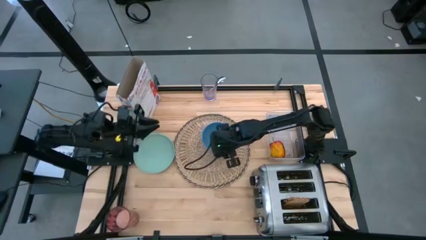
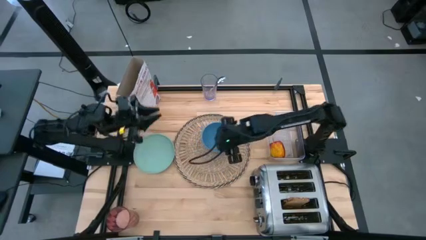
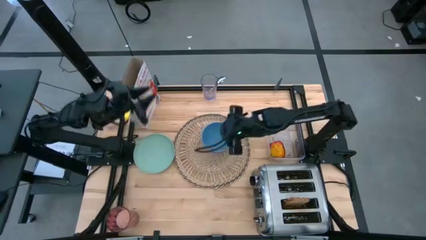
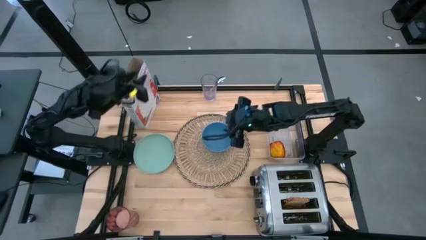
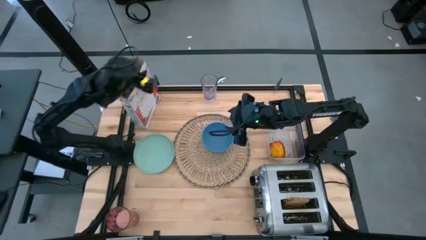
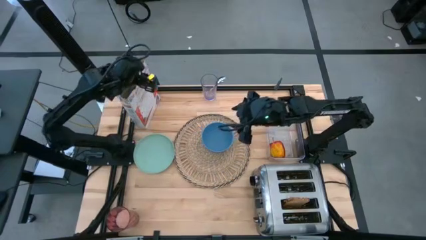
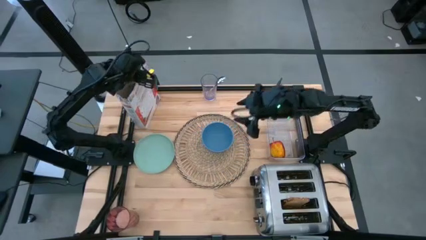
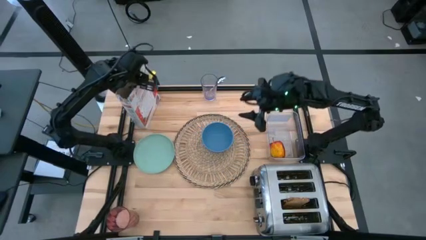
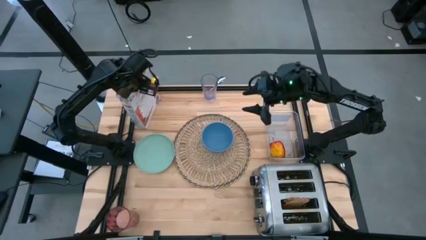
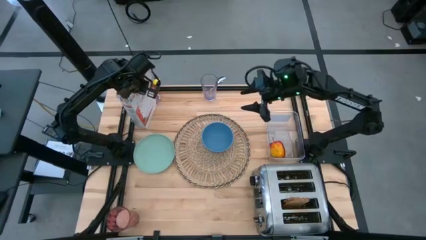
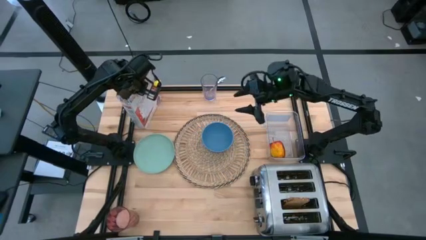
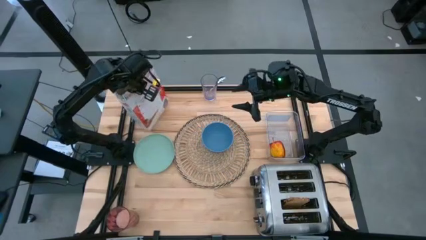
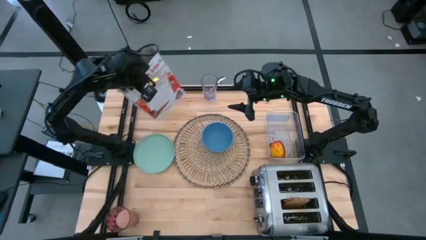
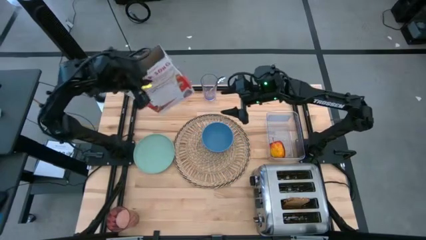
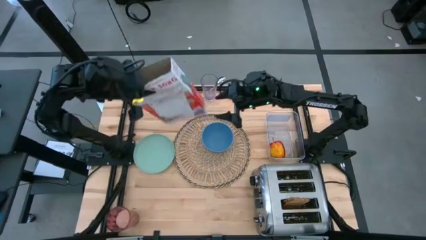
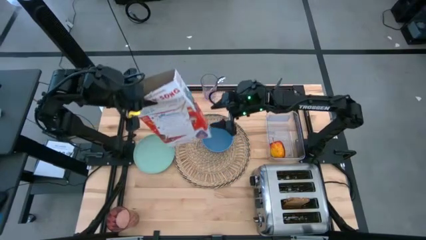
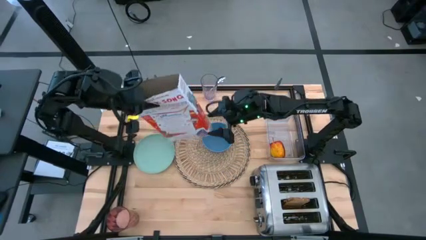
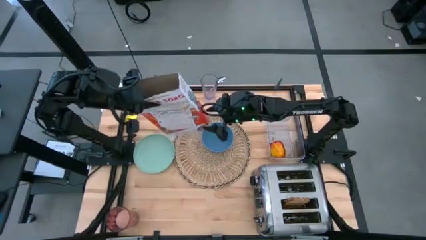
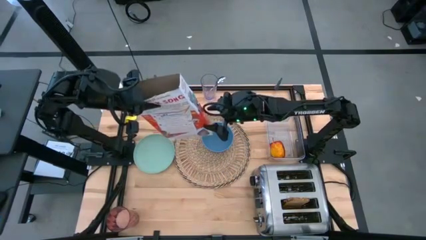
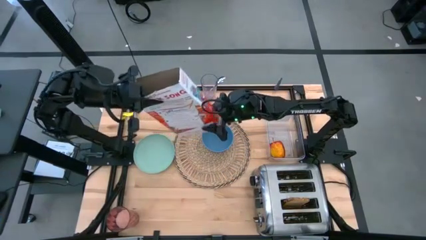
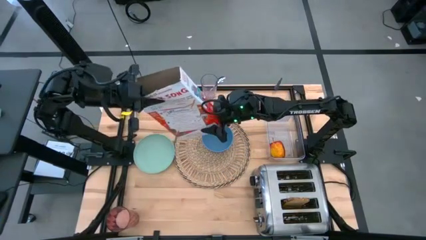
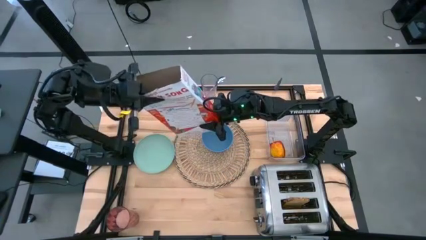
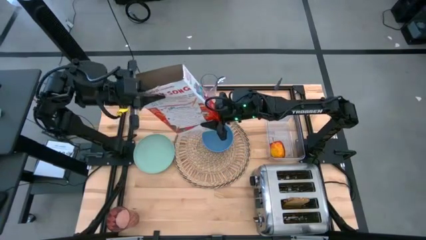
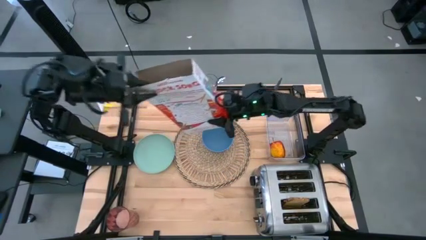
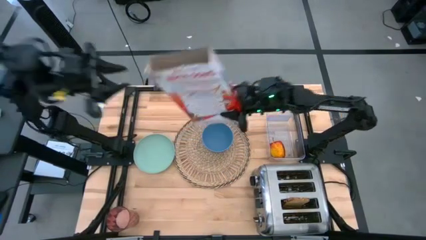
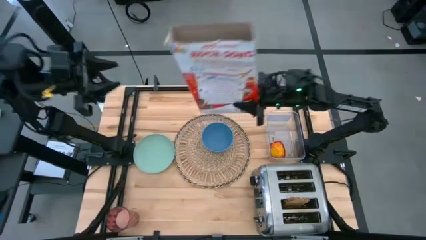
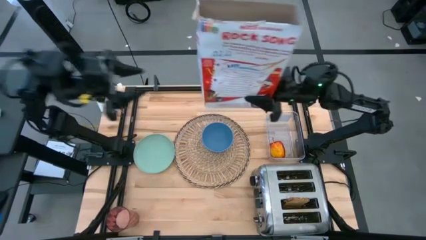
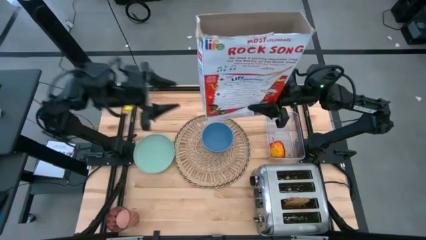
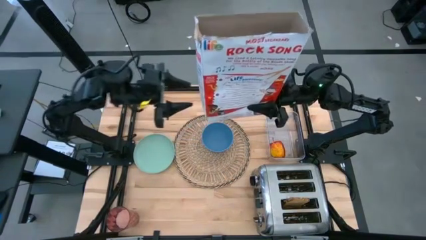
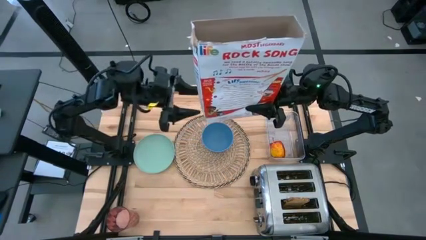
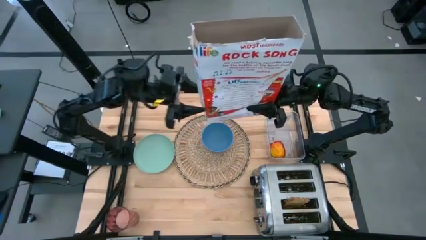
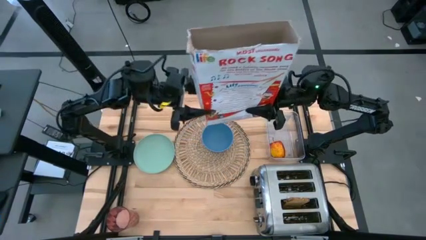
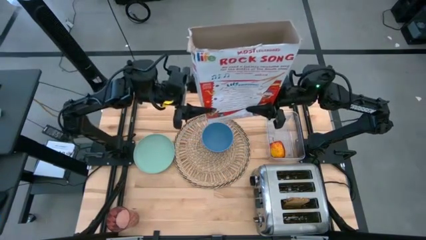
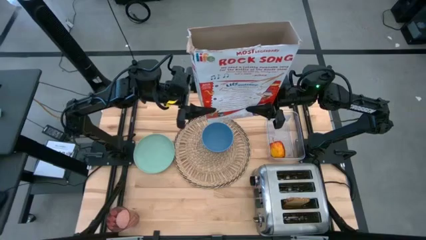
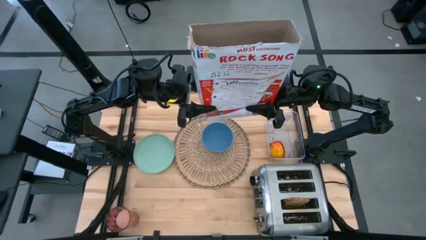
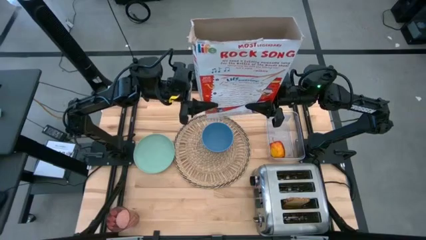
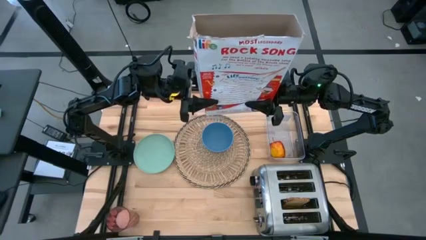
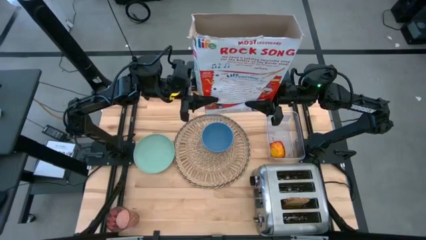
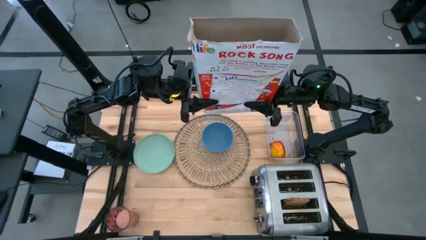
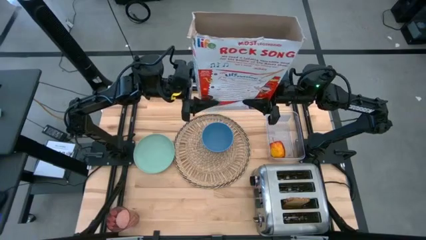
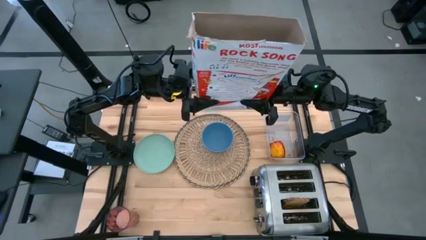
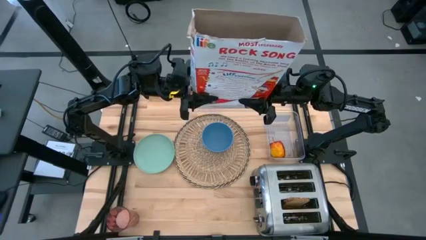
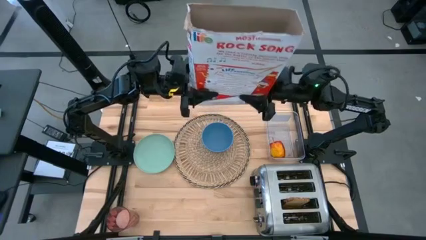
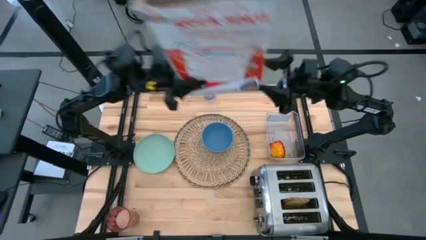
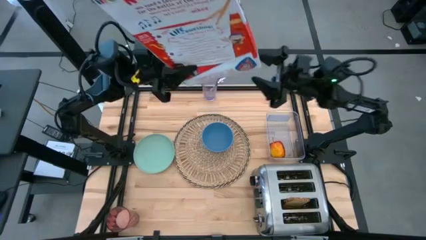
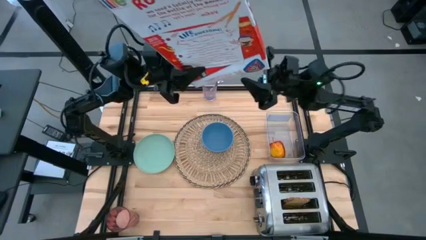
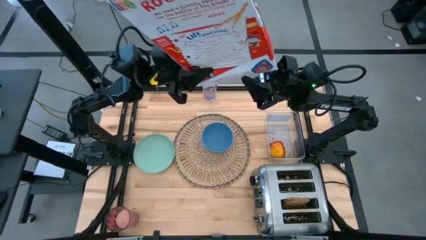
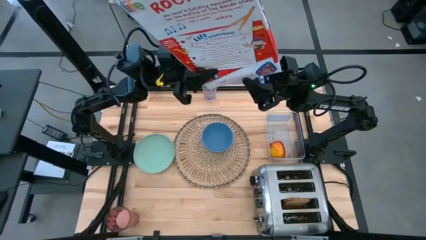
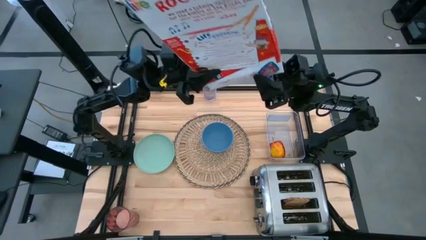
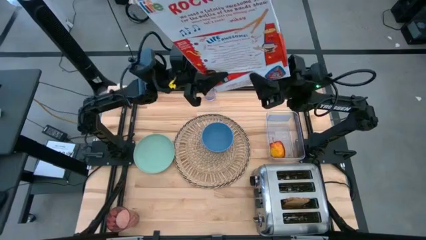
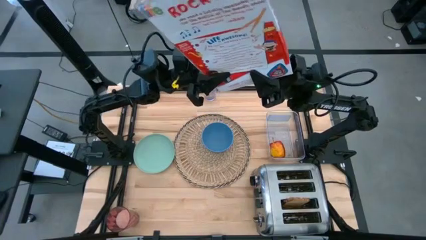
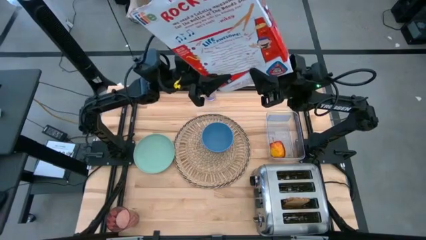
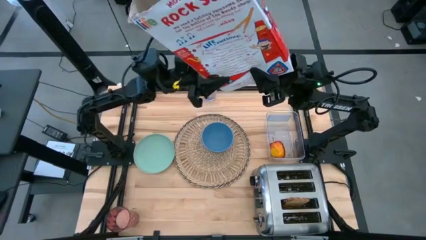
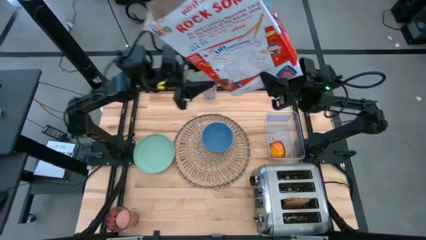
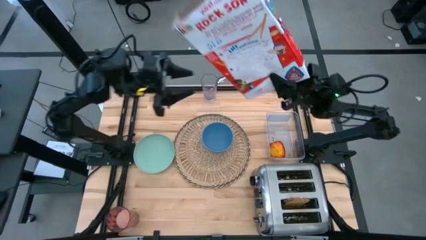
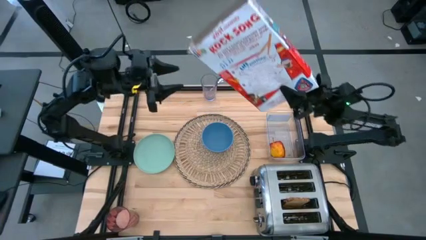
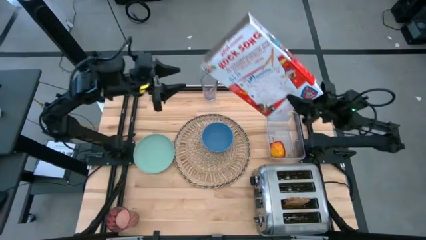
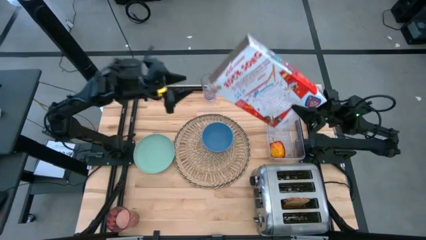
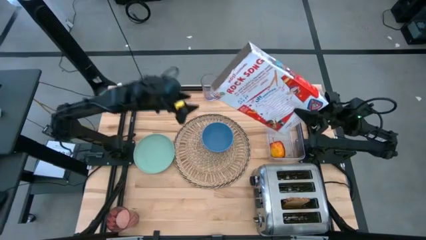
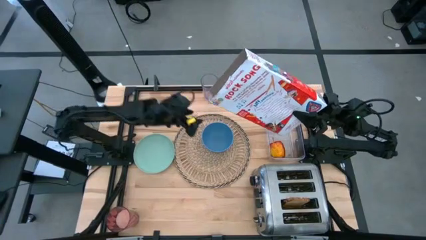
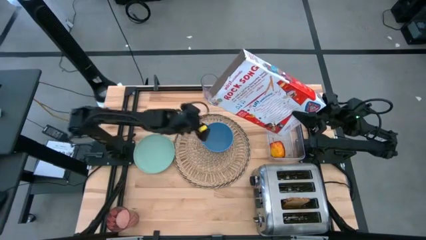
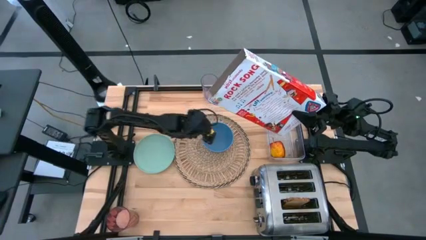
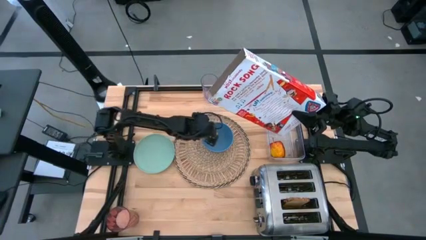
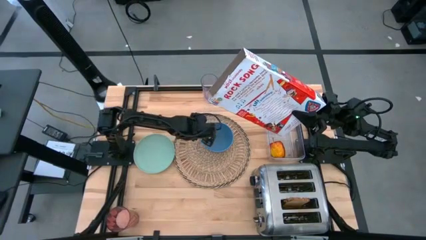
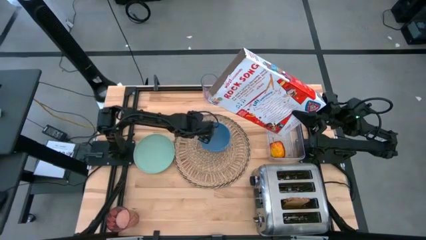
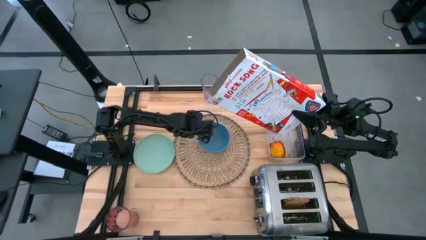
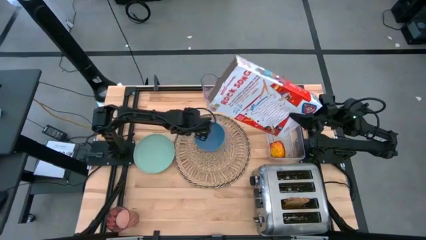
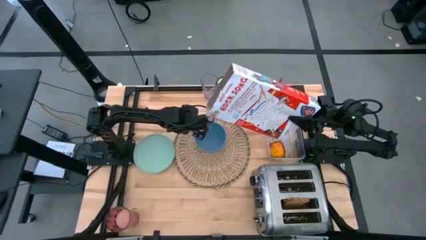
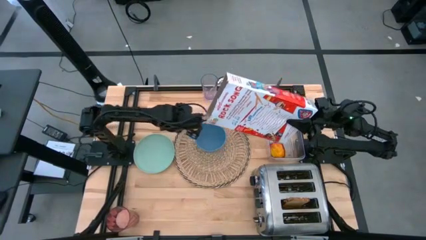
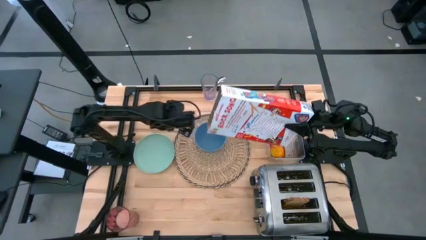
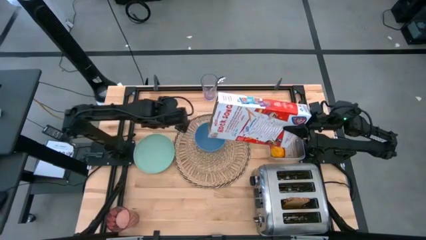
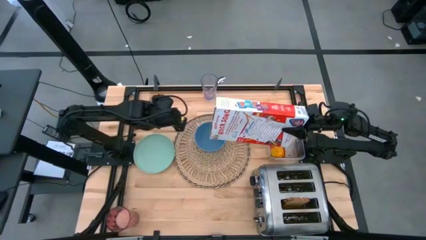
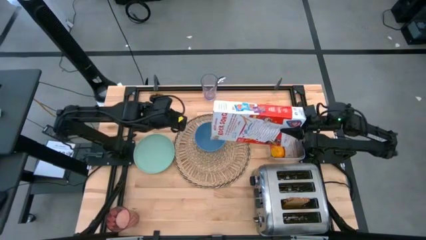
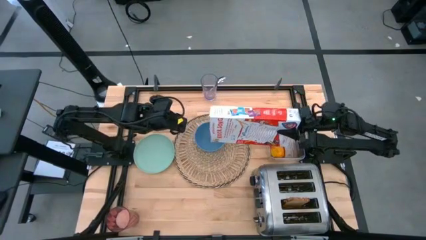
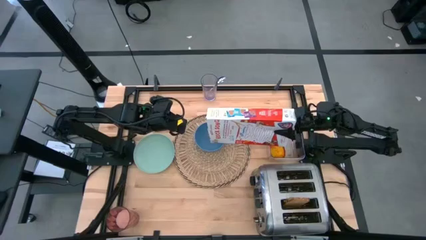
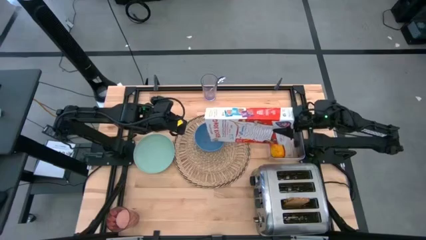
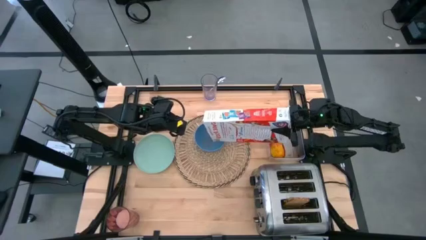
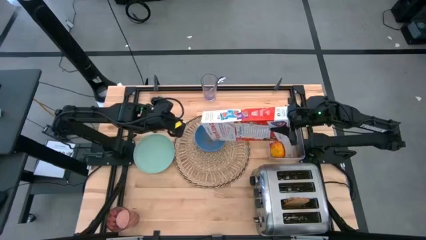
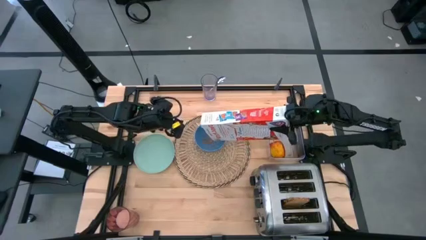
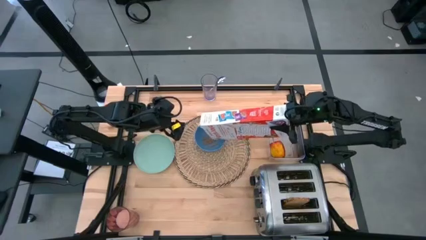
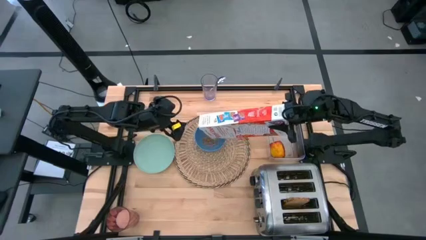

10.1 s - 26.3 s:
Task: Arrange a breakfast setting
Pour the cereal into the bowl
